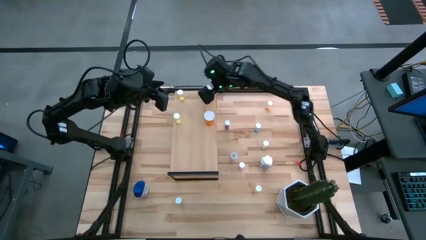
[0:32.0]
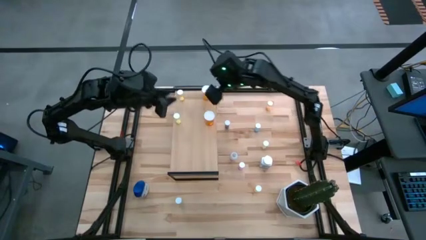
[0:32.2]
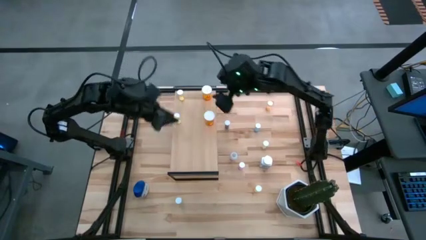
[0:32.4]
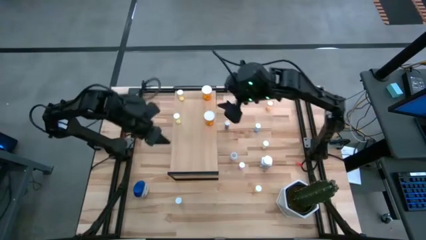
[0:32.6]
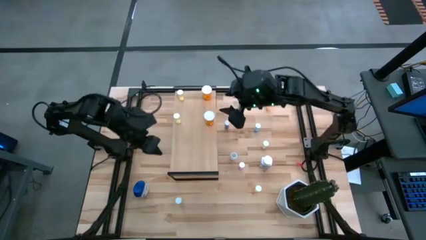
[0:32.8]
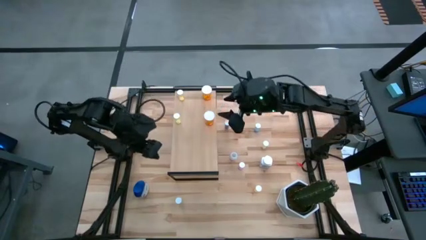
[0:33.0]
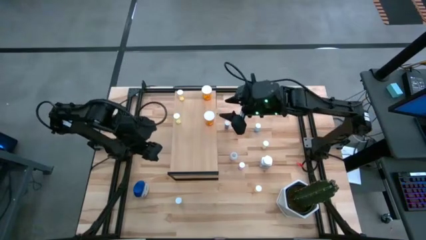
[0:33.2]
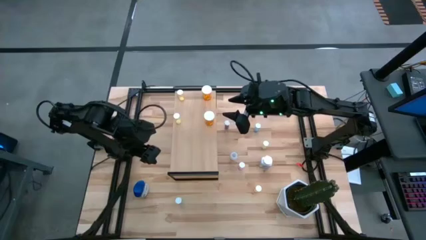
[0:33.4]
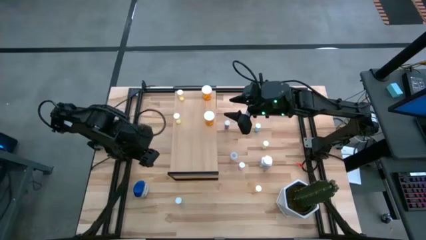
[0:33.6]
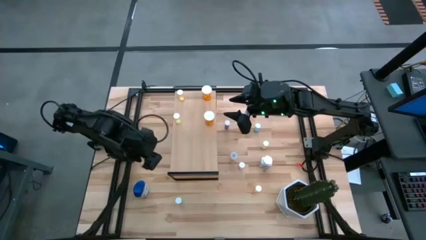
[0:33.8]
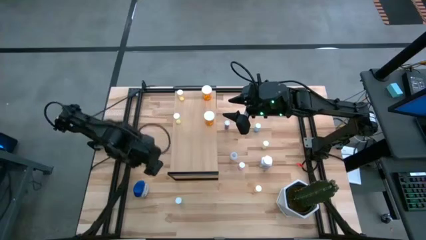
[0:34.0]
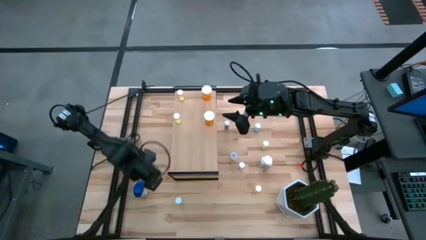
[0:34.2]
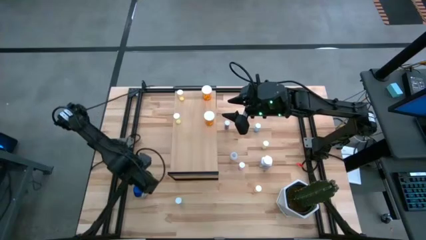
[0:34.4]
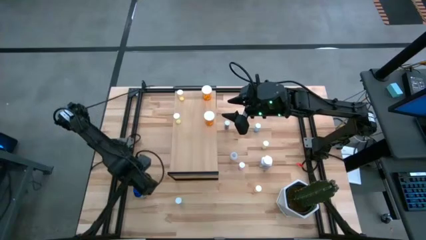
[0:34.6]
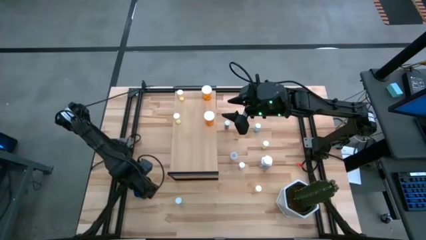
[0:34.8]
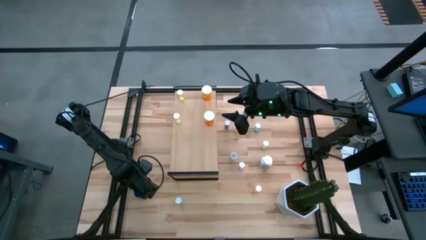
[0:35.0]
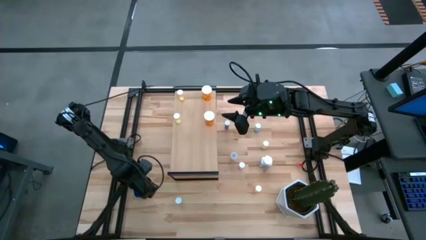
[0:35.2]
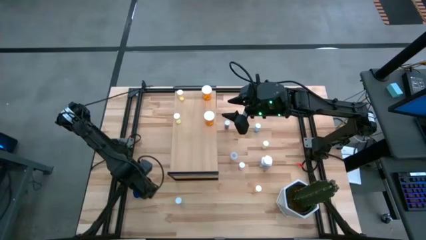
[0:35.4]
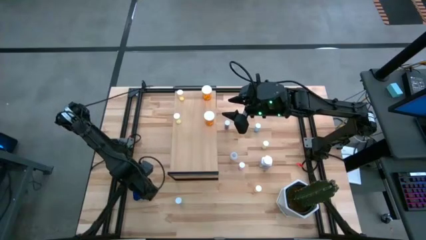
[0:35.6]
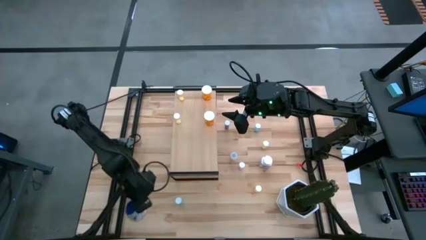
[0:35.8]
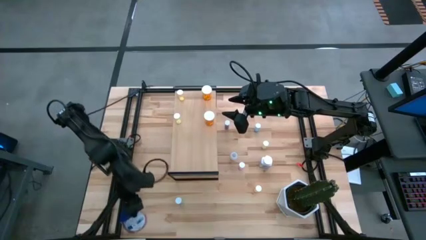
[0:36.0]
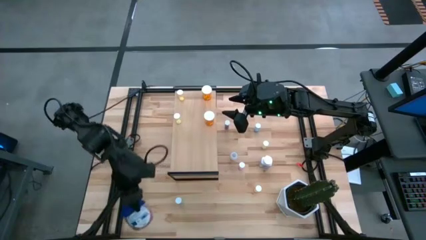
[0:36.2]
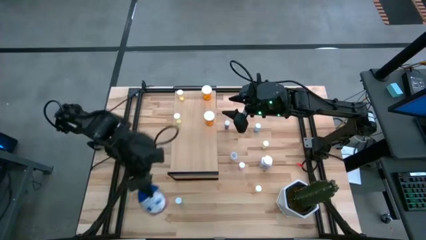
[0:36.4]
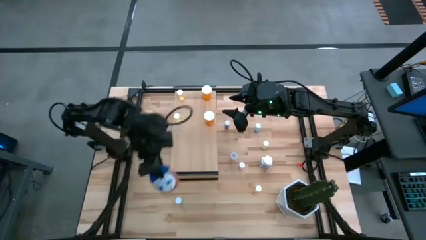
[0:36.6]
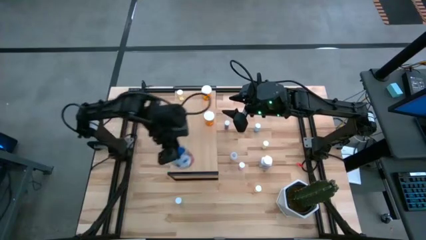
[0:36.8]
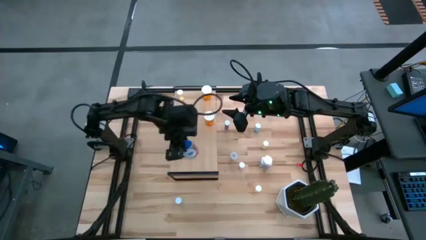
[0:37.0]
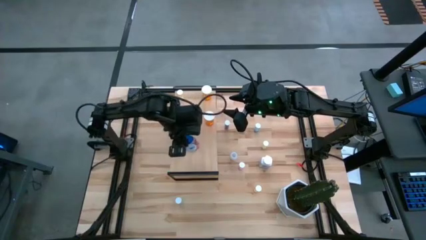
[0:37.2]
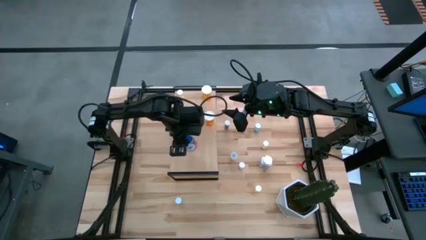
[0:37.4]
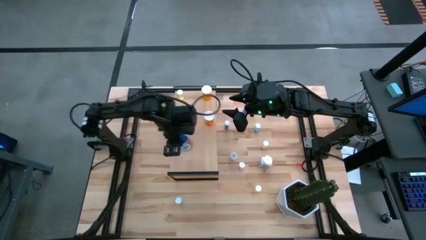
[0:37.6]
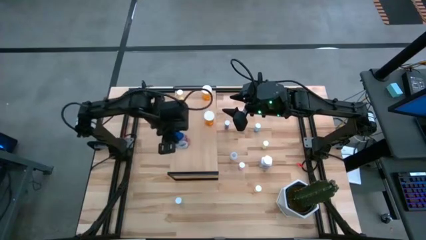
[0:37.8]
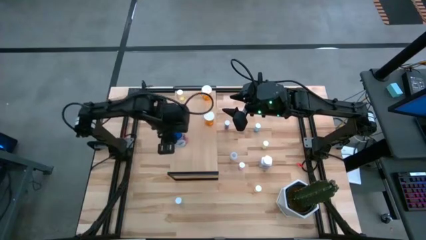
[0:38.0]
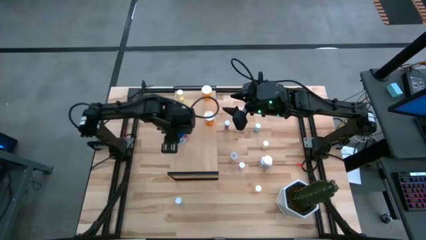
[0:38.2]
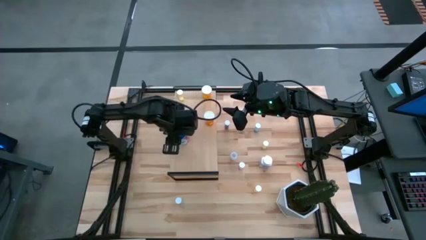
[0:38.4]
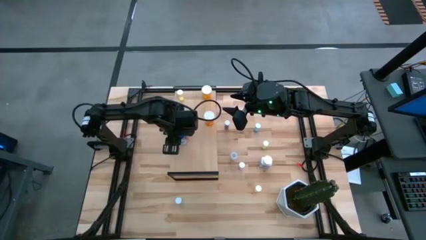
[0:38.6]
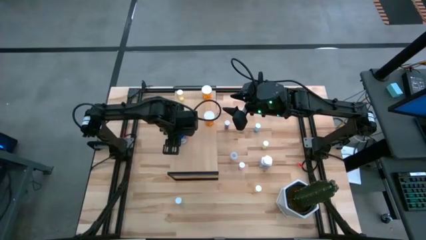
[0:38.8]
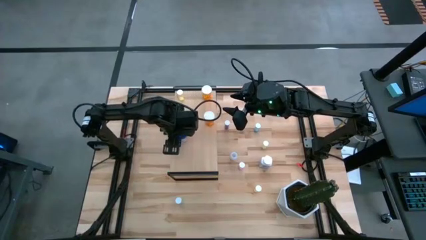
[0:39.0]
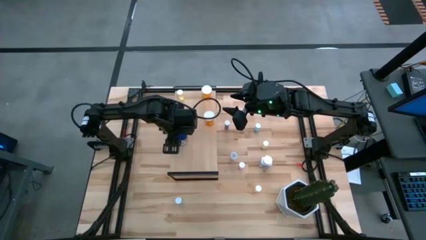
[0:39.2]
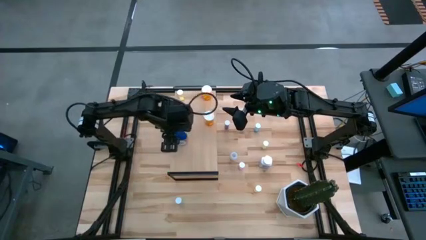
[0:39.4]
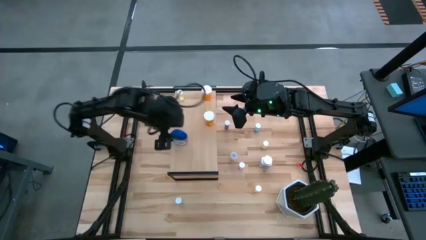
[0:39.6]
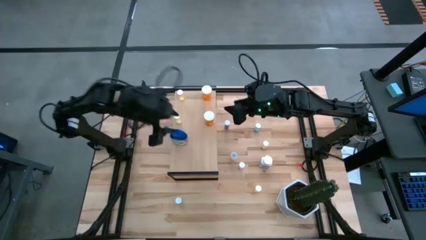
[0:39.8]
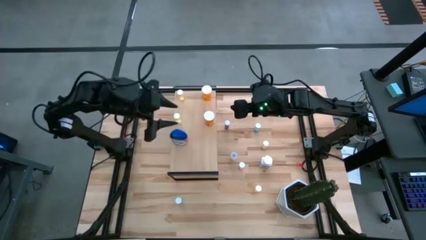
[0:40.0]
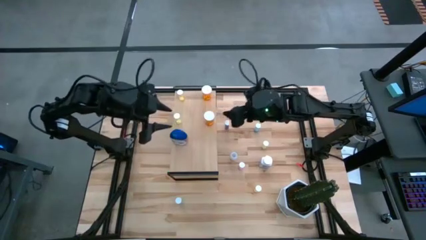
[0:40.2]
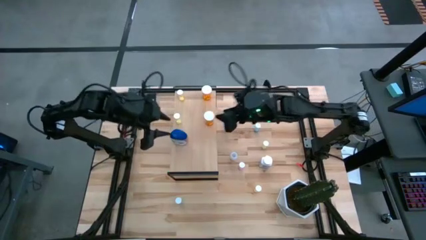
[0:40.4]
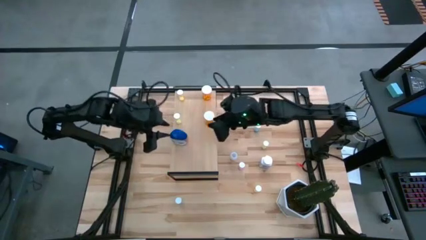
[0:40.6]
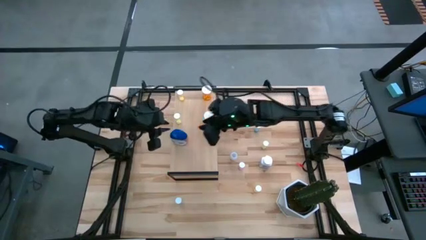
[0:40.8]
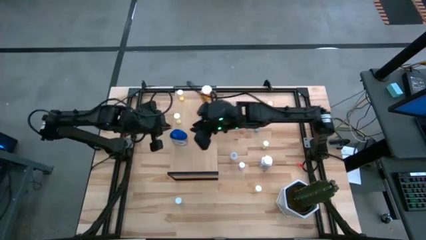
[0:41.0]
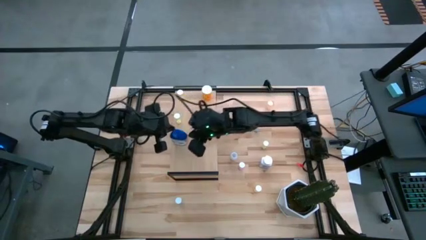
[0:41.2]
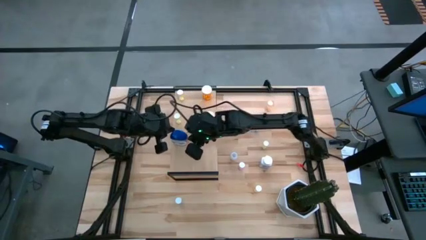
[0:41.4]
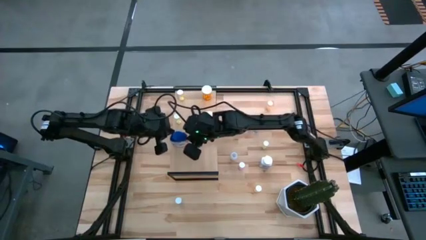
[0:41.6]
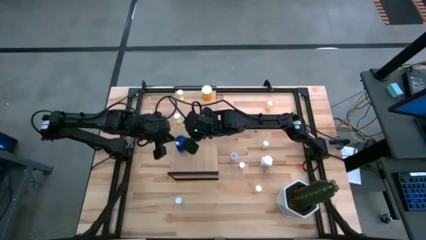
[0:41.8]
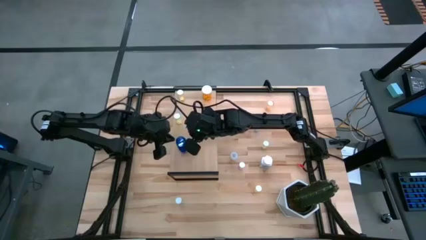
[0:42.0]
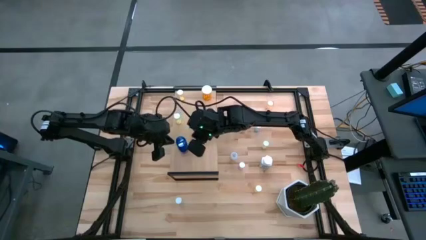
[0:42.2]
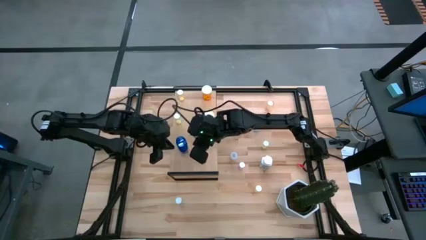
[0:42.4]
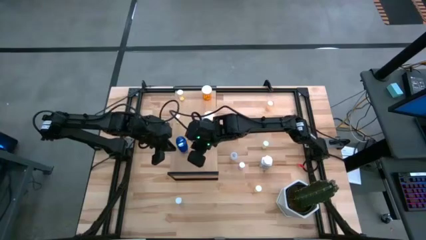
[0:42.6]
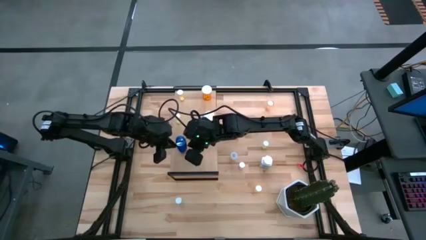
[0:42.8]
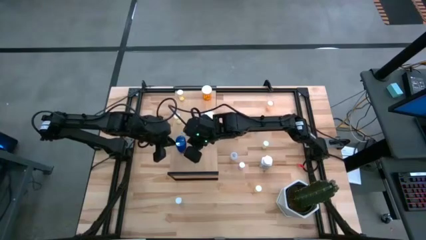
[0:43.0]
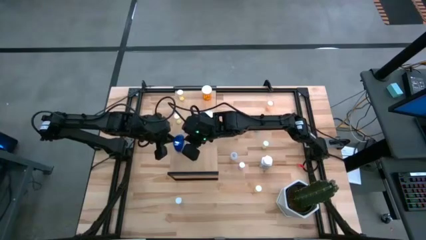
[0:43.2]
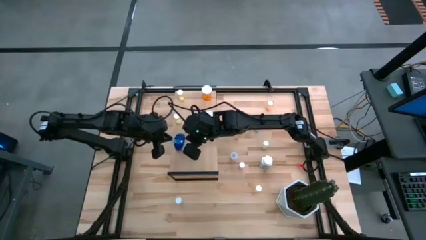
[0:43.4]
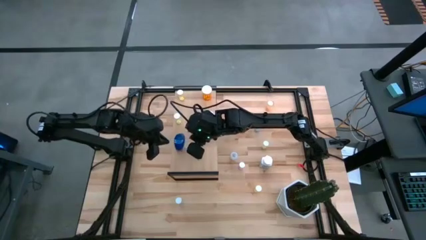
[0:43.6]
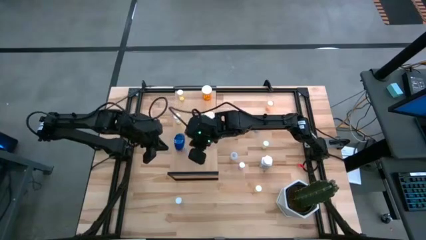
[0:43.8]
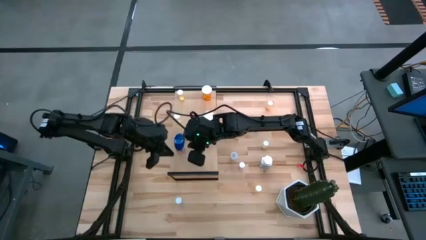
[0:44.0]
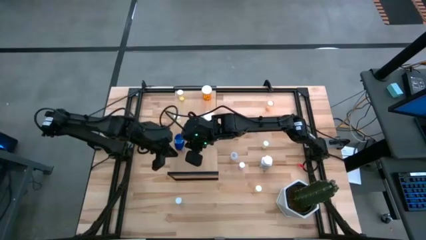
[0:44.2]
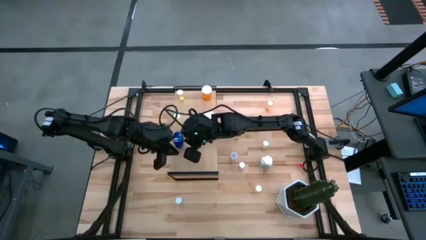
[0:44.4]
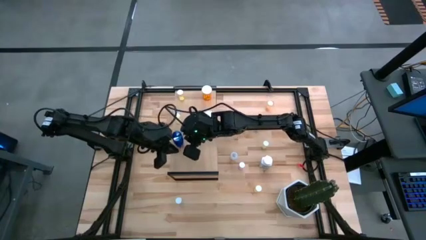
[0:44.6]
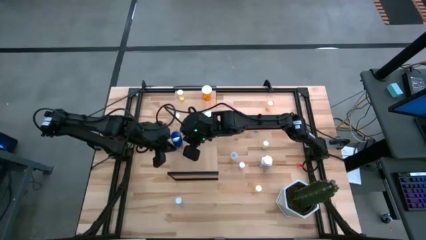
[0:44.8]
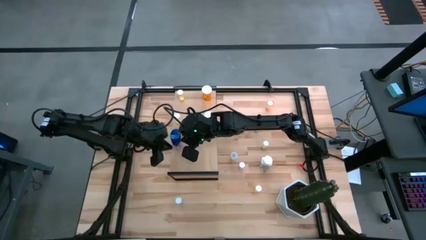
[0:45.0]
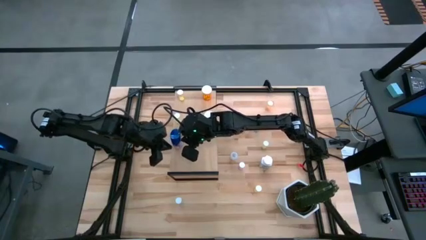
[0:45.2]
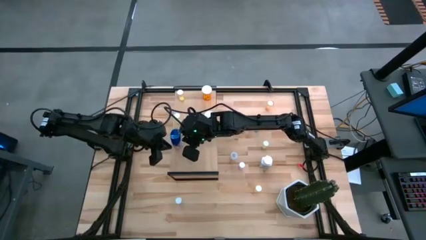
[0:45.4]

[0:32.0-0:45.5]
Task: Pick and place medicine bottles onto shelf by color
Put the dark blue tablet bottle on the shelf

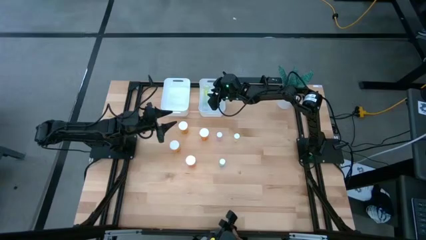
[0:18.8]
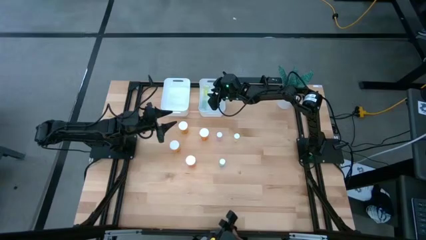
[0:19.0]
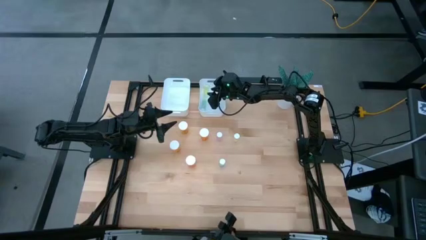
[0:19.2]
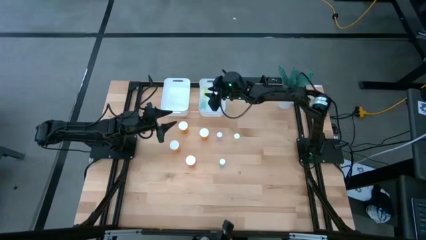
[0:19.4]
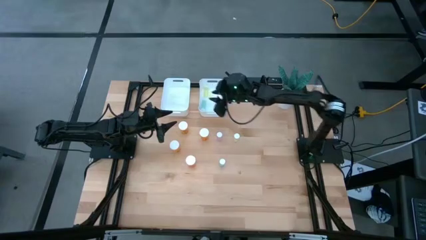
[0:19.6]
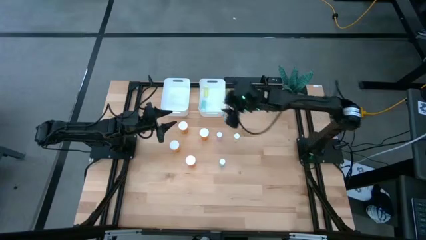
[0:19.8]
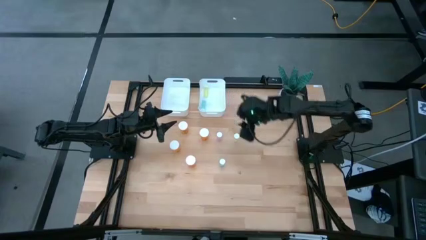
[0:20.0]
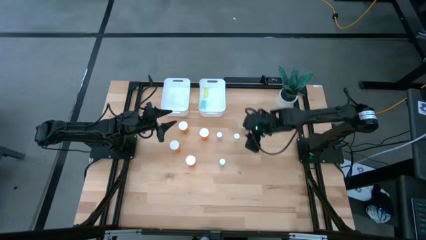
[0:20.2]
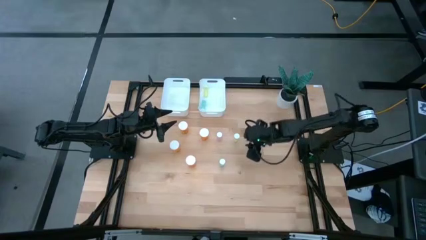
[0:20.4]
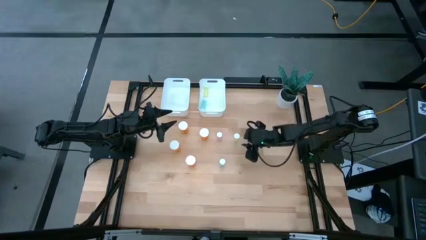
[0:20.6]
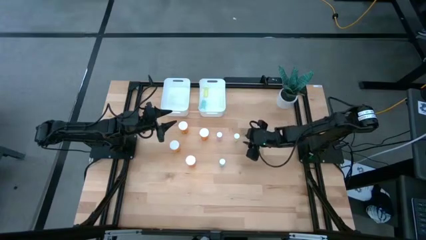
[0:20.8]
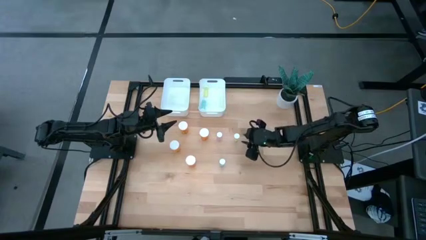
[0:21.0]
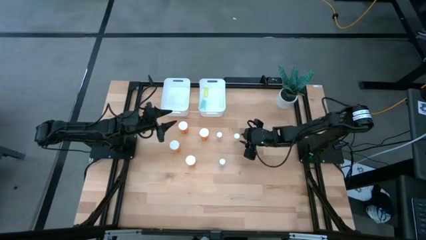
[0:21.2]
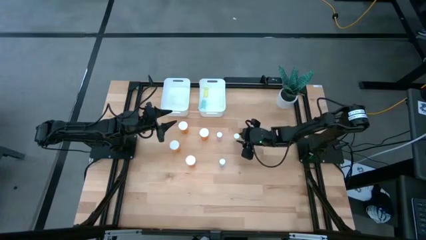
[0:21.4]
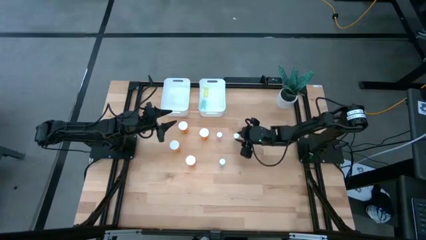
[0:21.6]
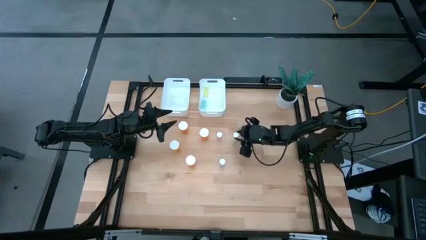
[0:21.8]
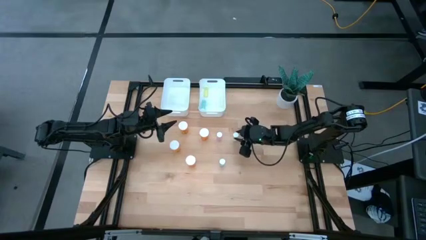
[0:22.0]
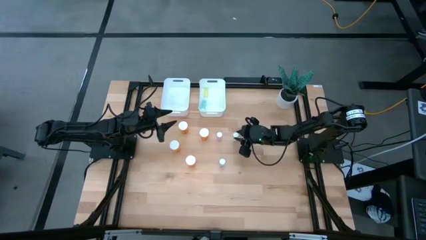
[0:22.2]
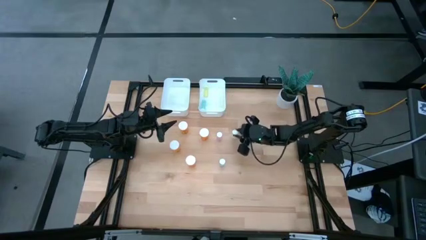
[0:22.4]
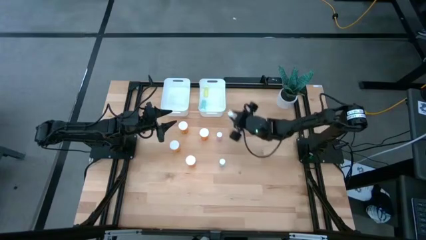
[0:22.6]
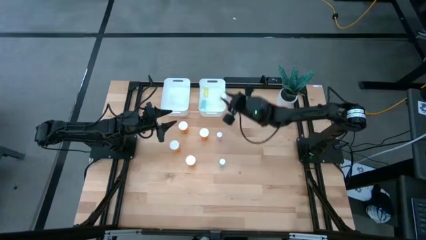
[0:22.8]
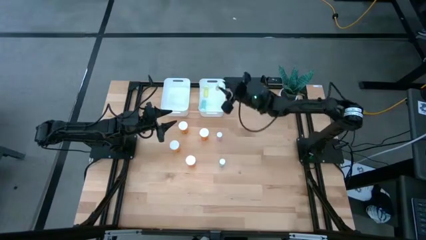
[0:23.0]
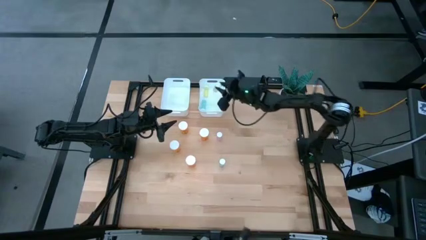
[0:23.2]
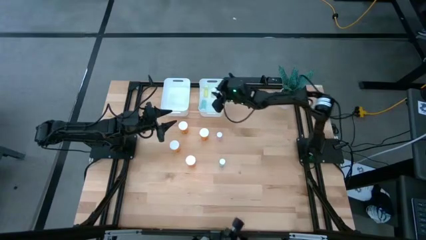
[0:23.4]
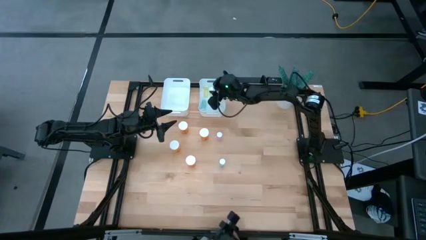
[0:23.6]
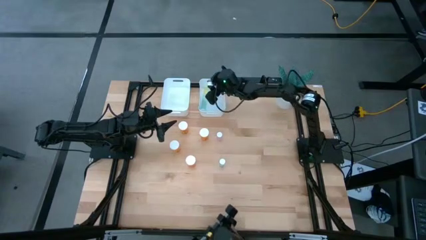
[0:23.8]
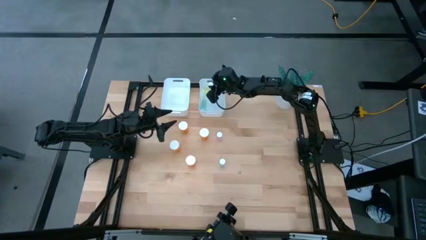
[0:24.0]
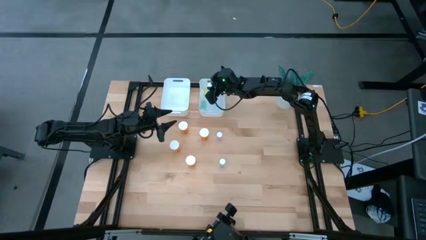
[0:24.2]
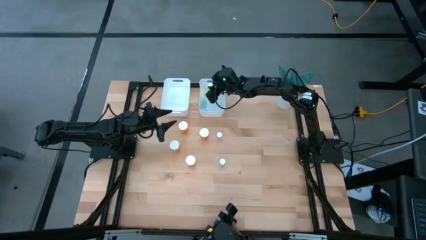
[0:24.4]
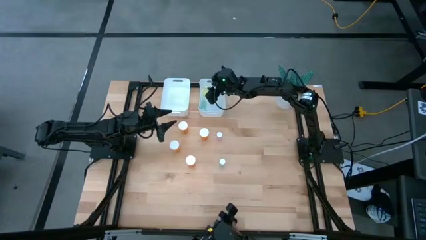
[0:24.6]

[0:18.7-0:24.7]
Task: Pick and place medicine bottles into bin by pill shape (circle, oval)
Put the small blue pill bottle into the right white bin
